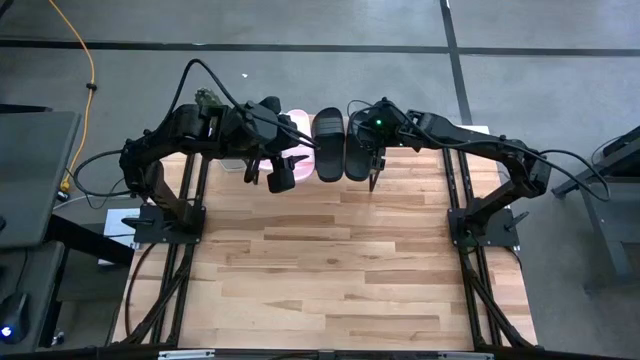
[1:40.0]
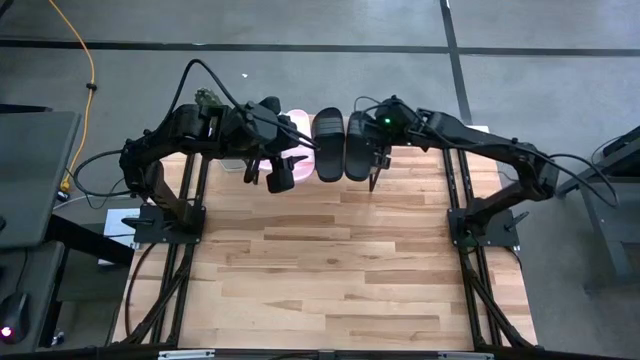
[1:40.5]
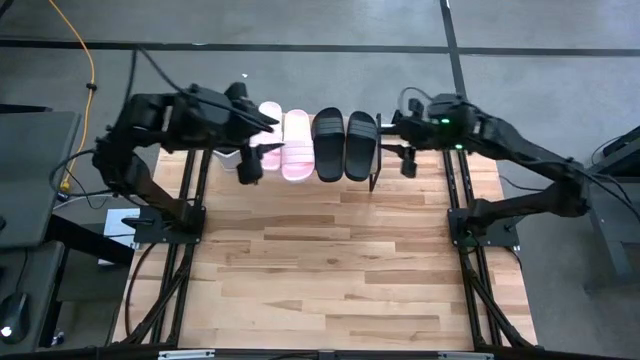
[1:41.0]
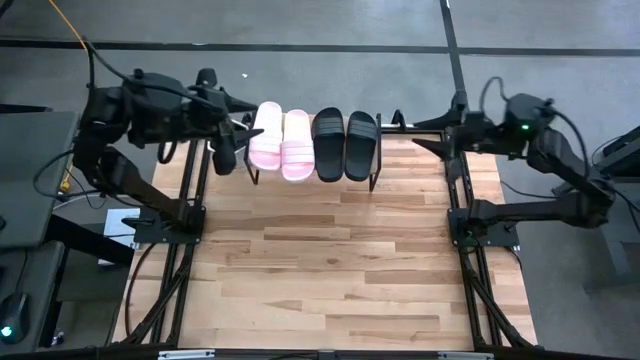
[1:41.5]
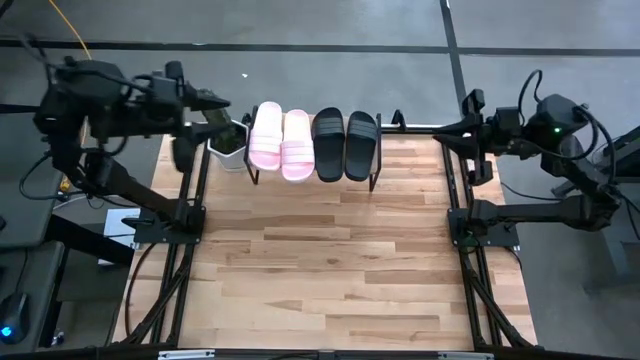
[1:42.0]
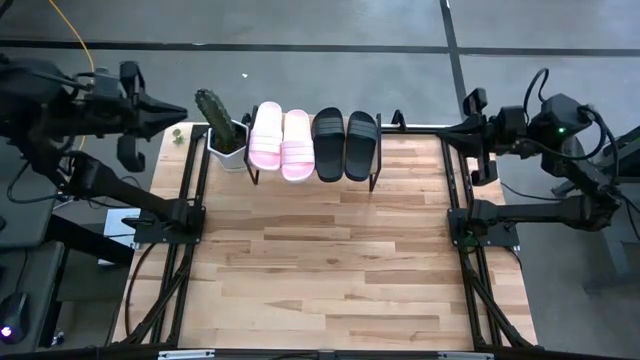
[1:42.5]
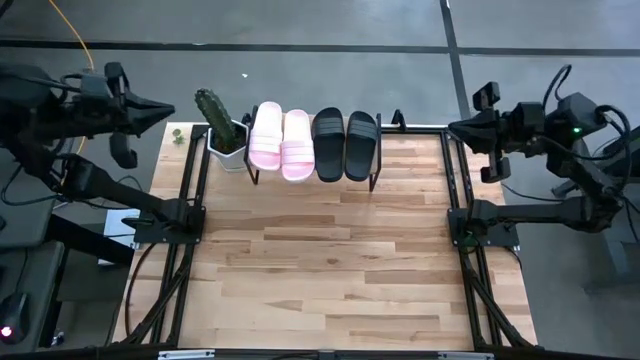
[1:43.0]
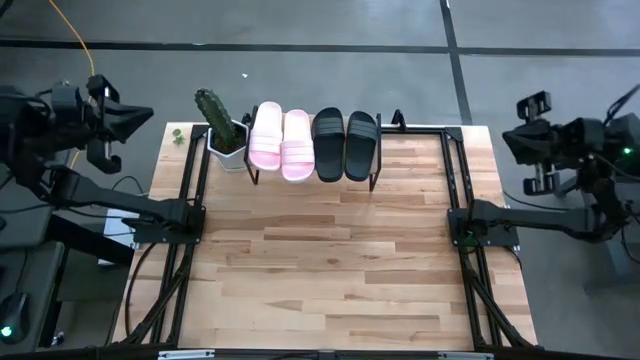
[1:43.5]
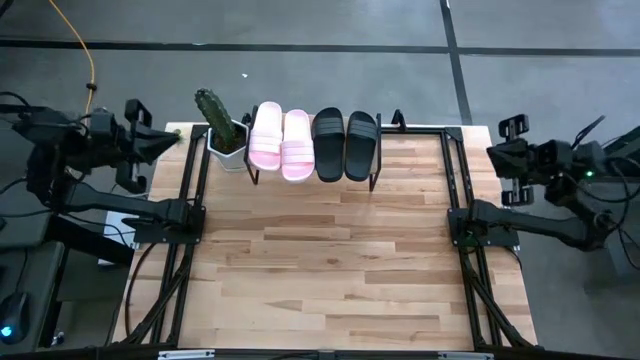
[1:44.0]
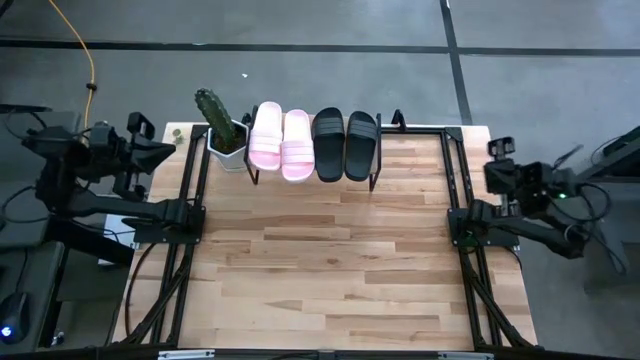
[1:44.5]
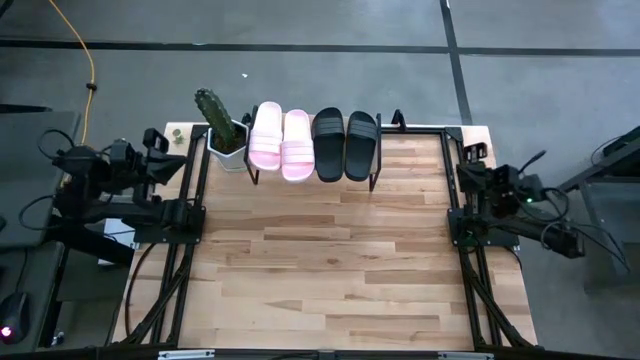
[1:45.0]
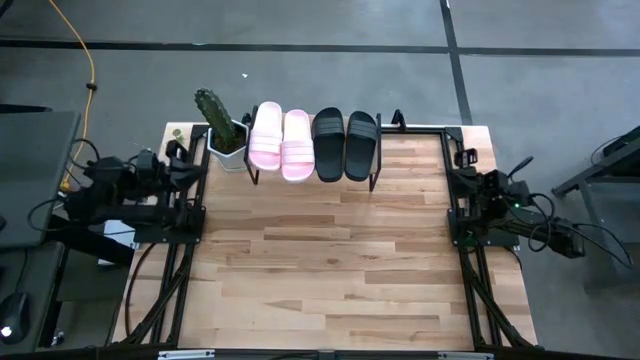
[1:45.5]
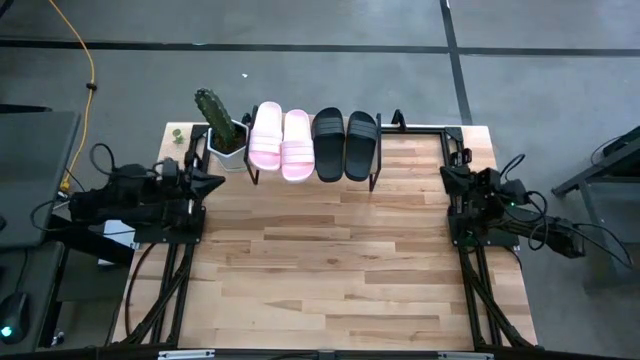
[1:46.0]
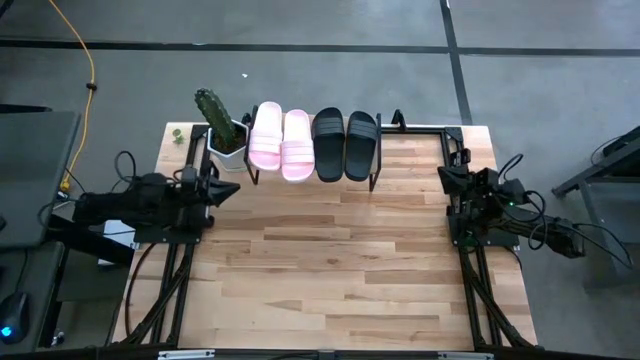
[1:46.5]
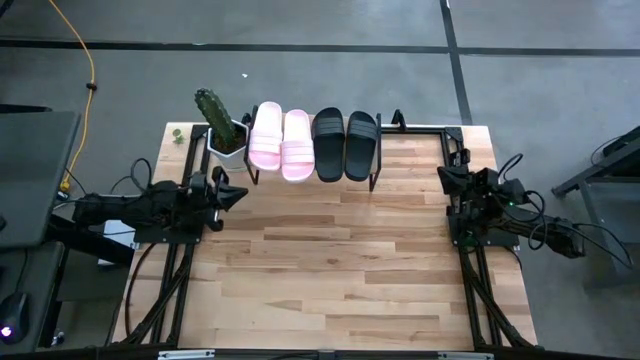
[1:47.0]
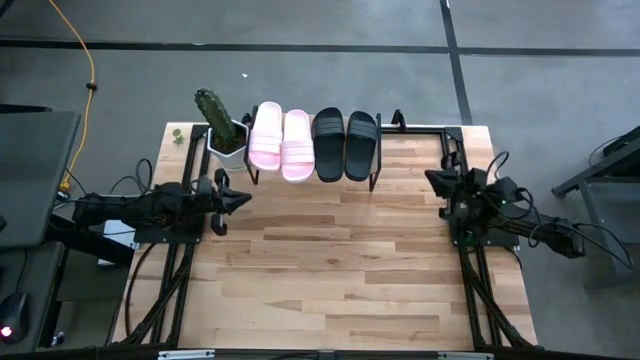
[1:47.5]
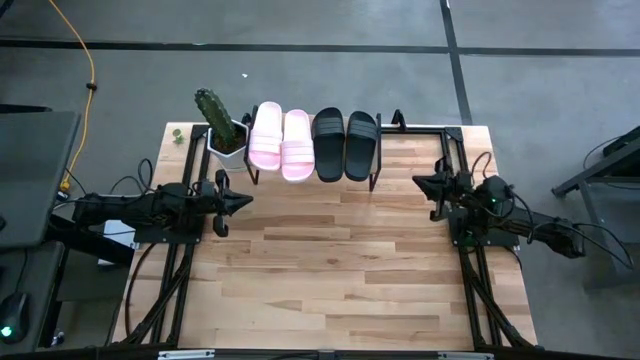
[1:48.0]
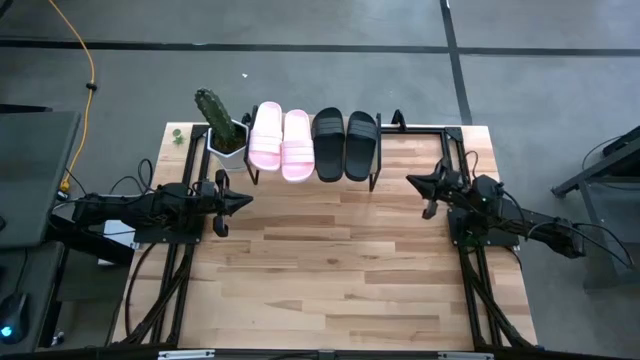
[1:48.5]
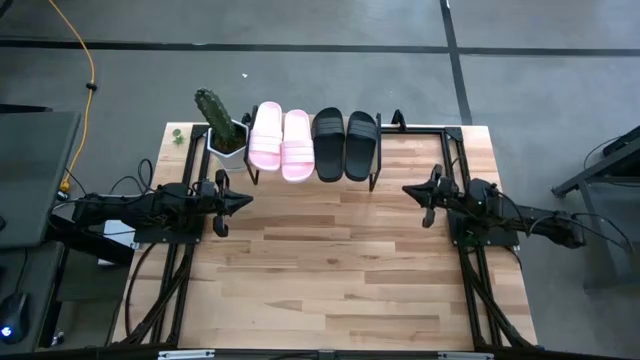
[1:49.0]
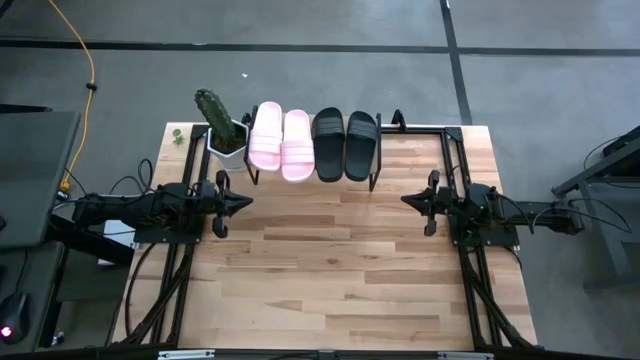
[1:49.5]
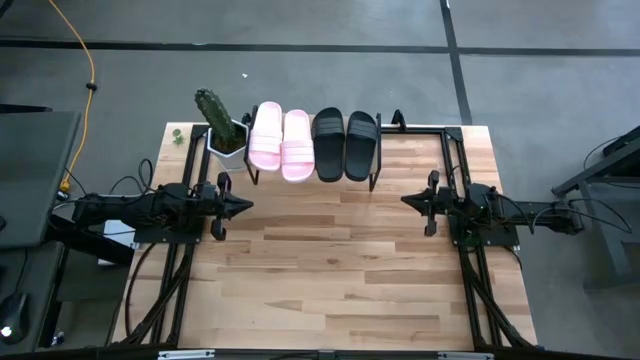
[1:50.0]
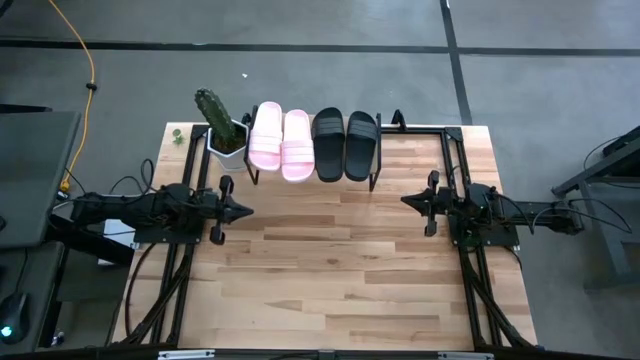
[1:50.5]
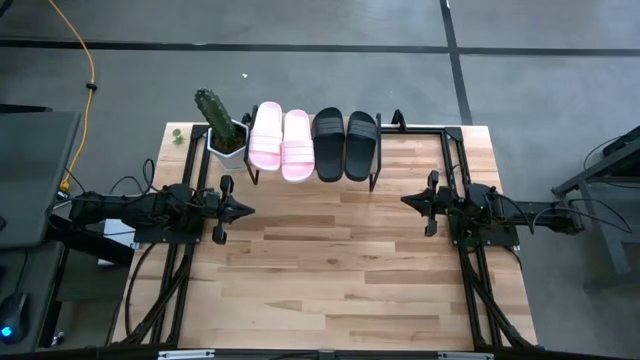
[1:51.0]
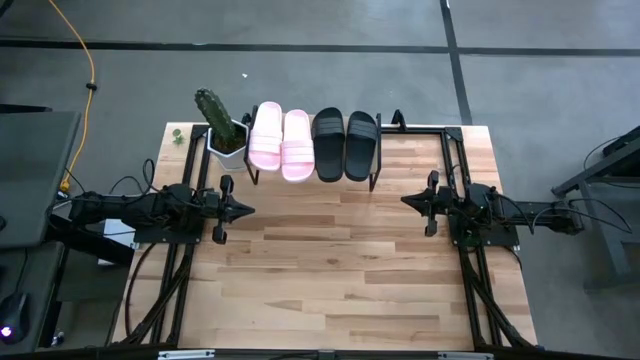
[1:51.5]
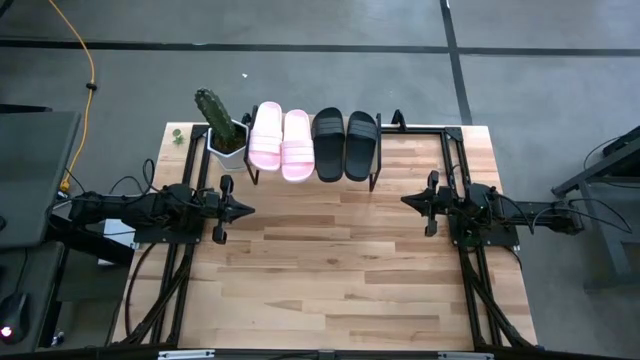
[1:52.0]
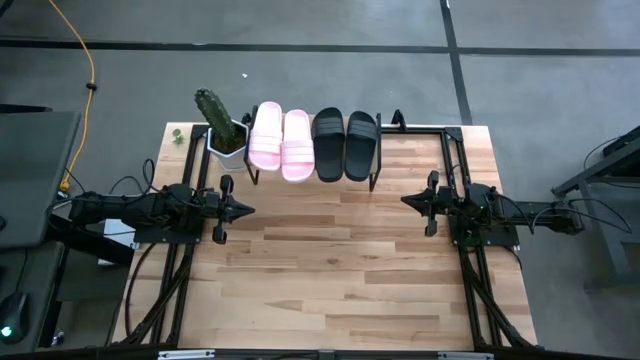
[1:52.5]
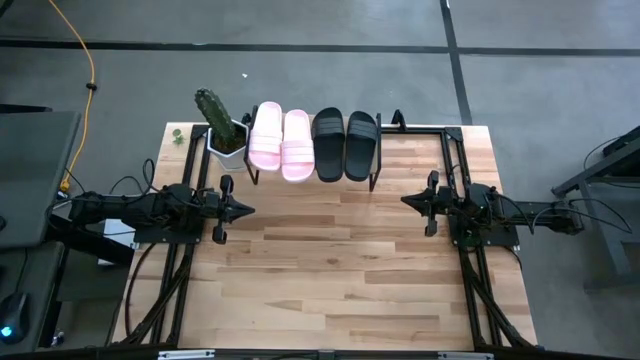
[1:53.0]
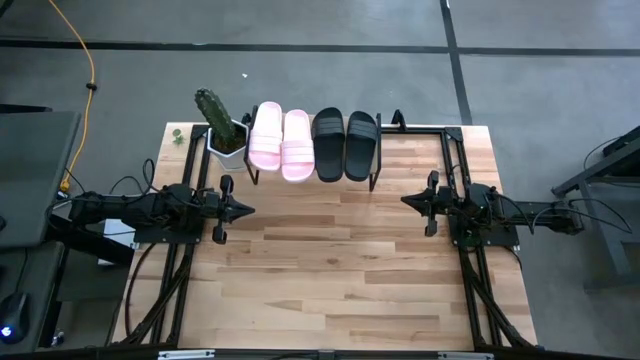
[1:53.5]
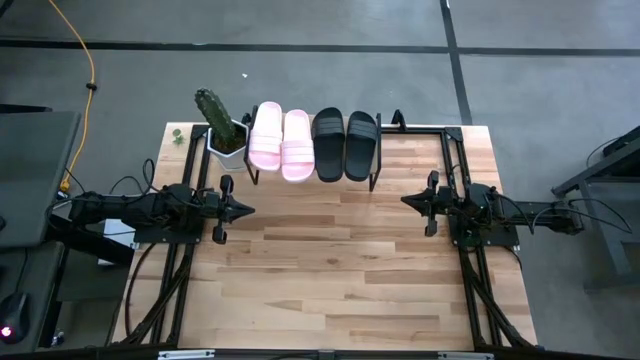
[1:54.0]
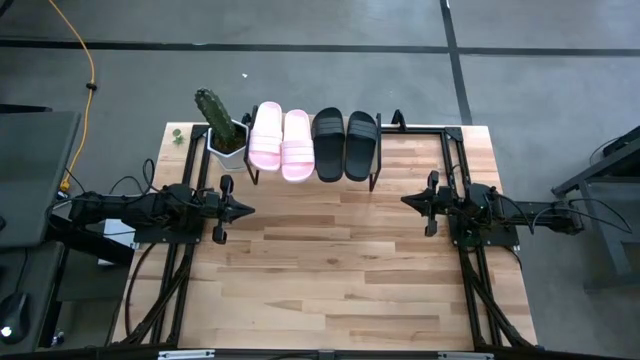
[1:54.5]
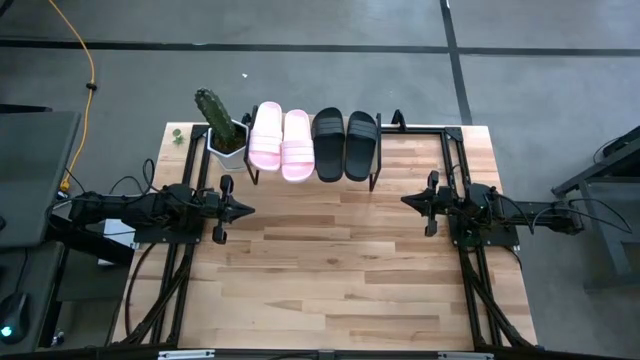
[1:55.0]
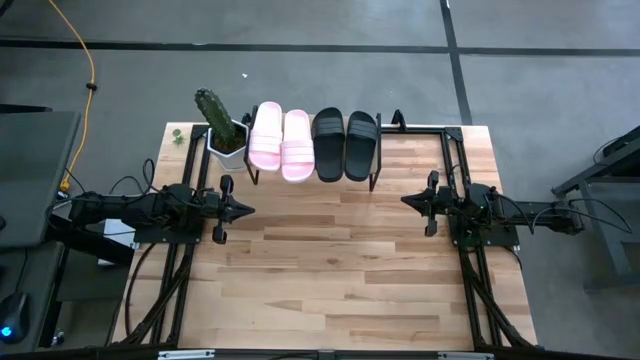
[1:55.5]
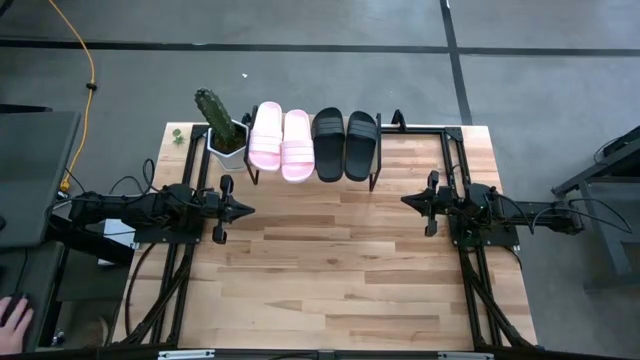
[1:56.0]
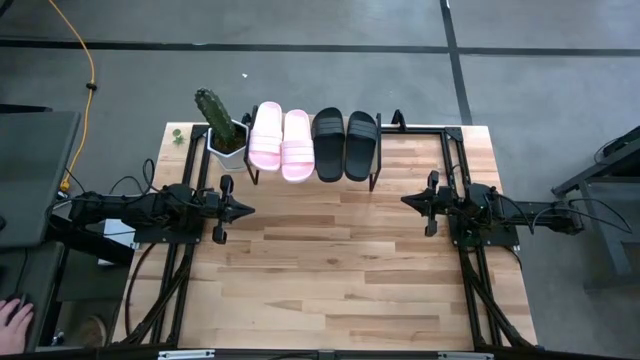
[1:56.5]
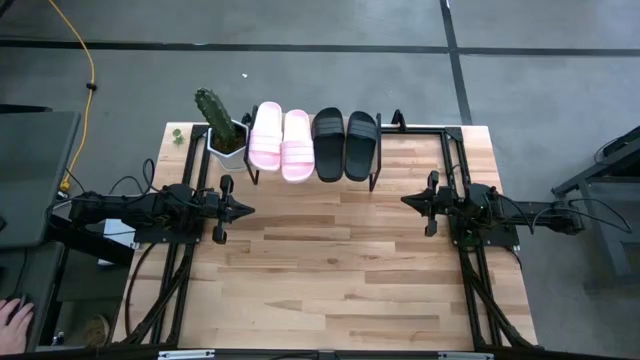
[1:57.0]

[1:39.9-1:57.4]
Task: Pick and place slides into the shelf
Return to Home Position

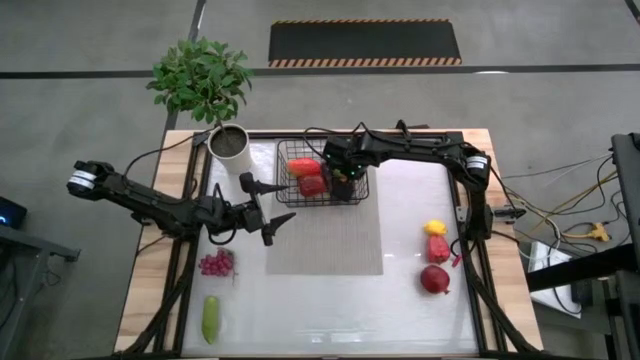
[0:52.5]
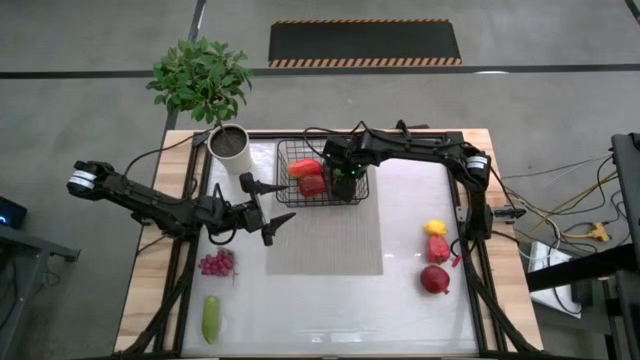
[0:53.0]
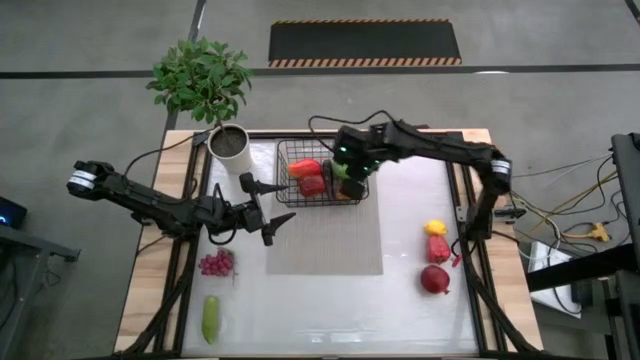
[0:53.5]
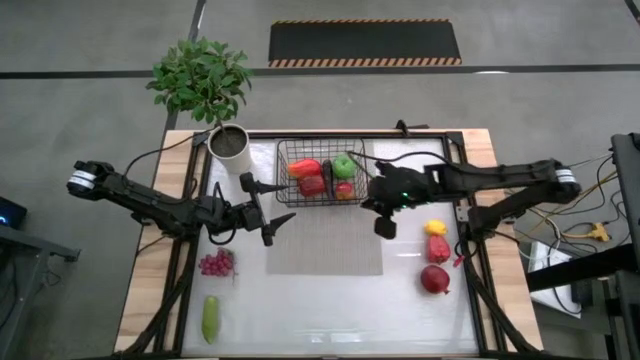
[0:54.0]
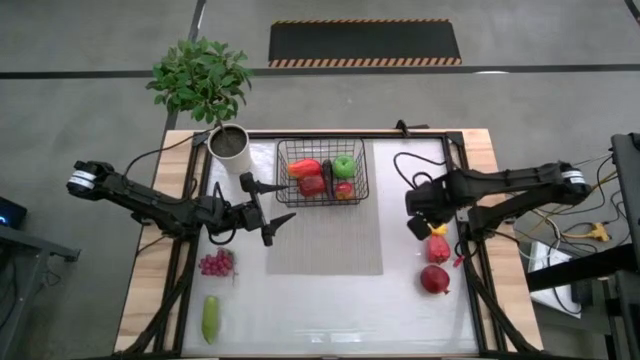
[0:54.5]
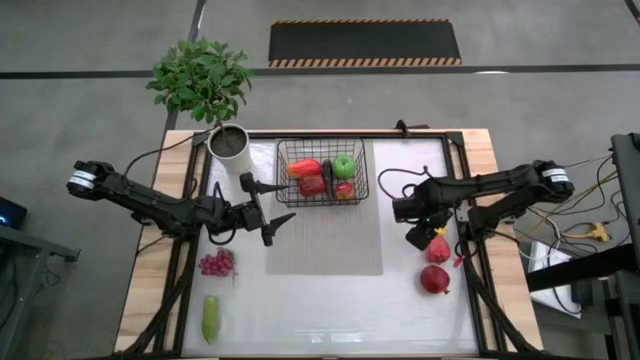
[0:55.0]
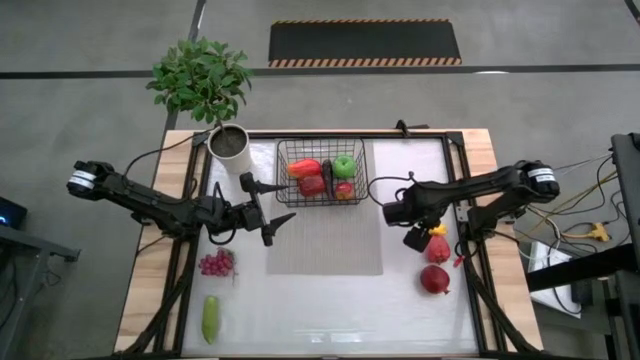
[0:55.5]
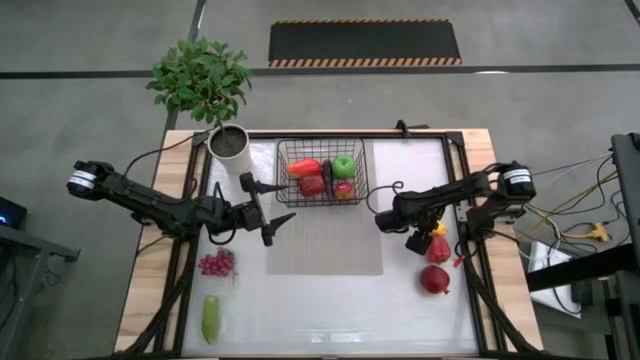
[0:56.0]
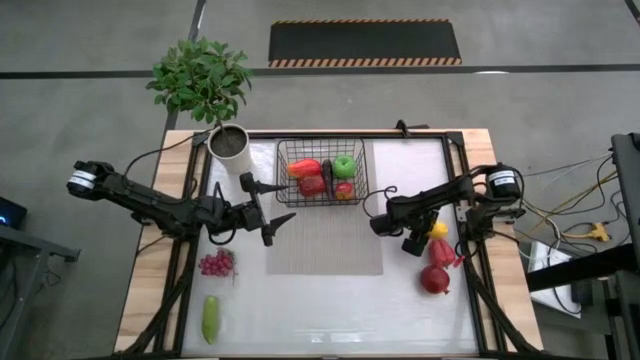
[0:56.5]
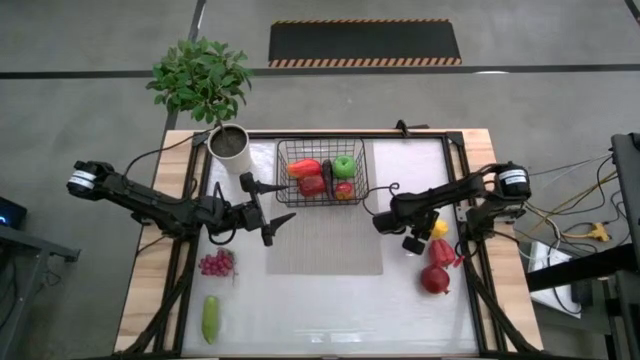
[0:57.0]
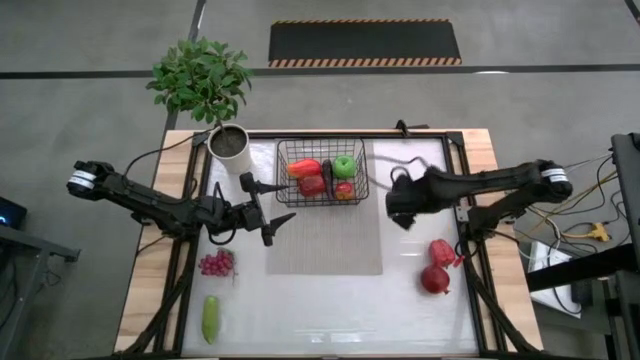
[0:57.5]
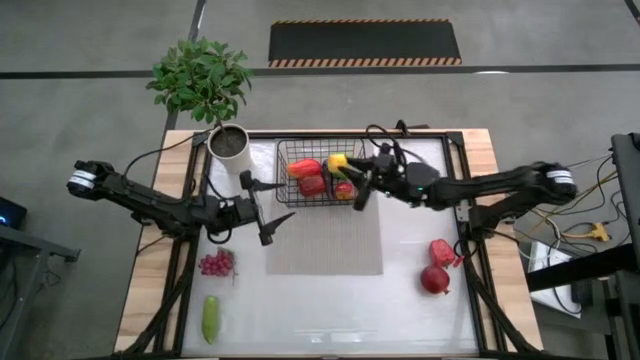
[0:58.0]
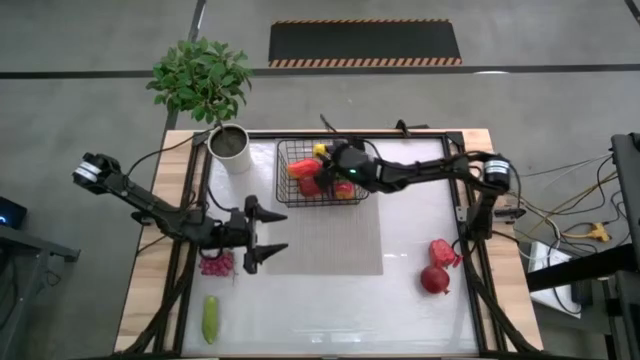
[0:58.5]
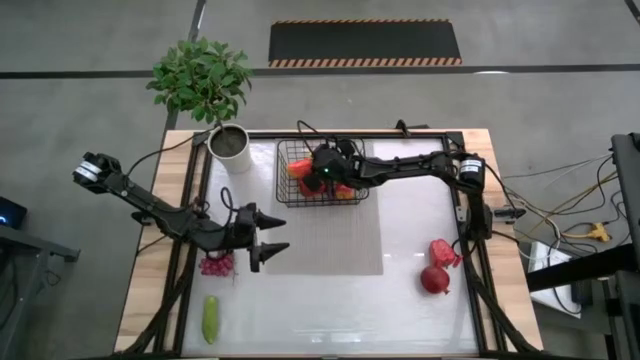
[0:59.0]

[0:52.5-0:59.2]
Task: Build produce basket
Put the lemon into the wire basket
